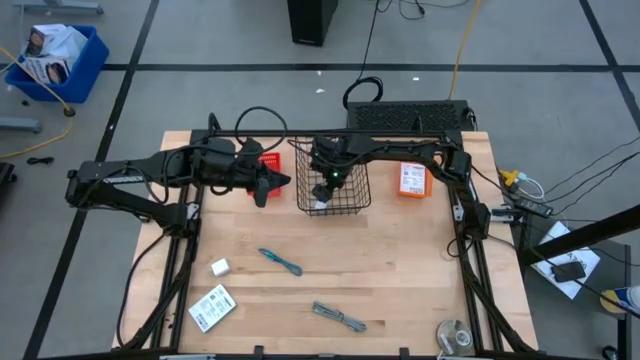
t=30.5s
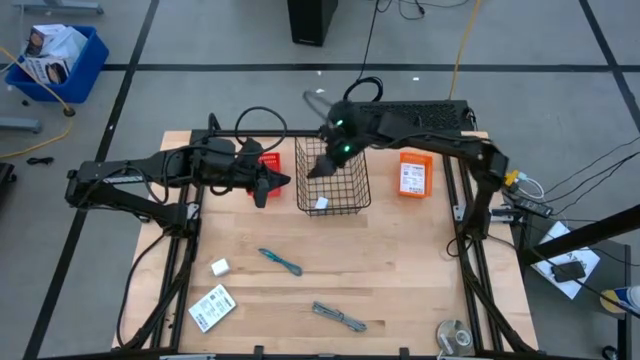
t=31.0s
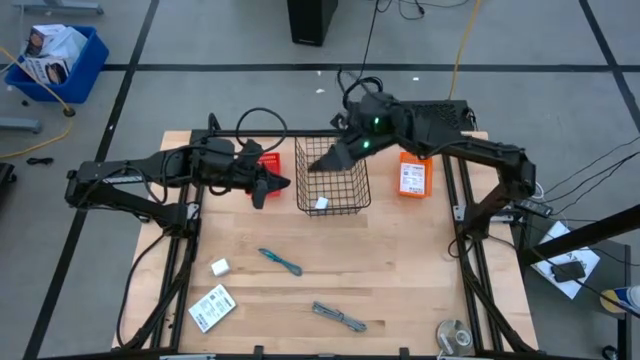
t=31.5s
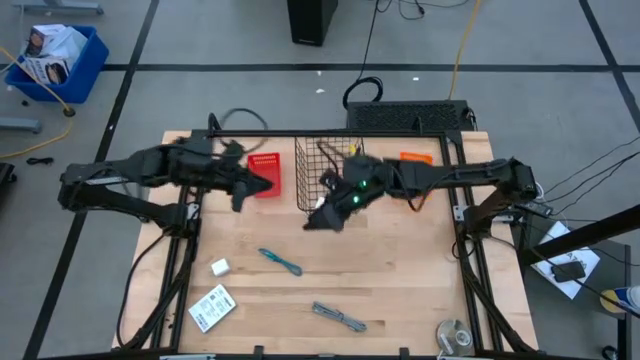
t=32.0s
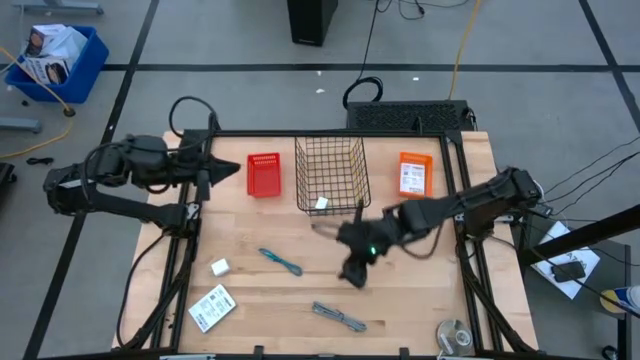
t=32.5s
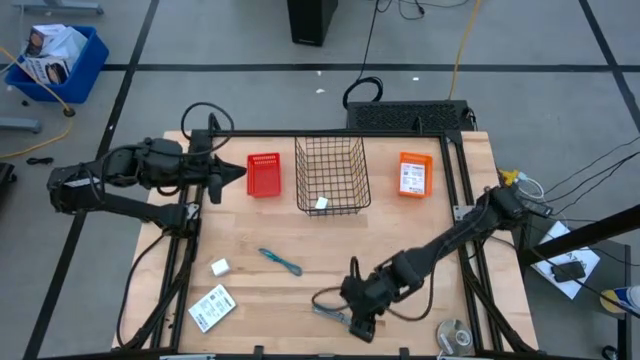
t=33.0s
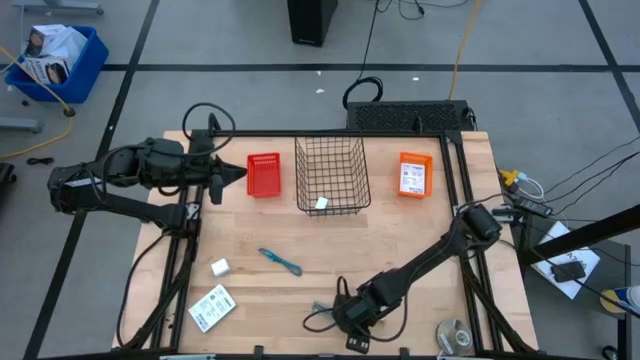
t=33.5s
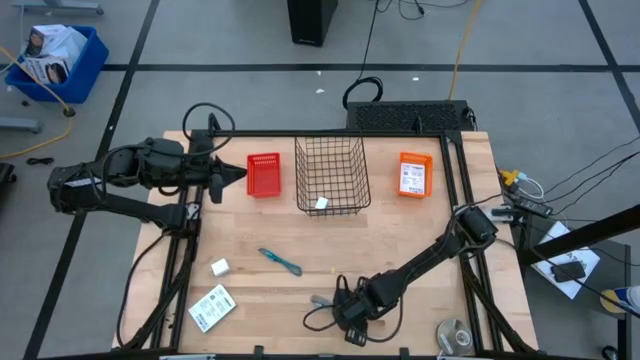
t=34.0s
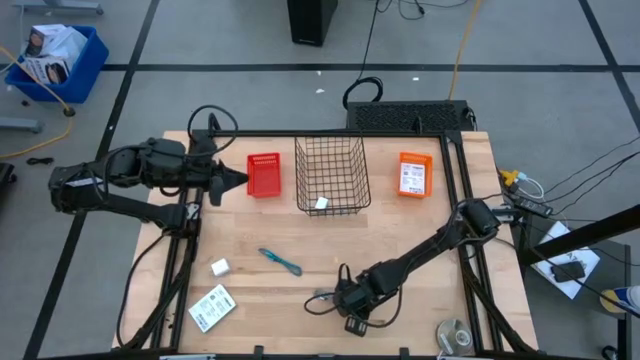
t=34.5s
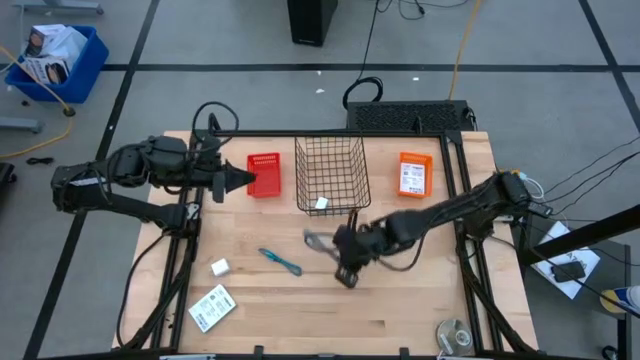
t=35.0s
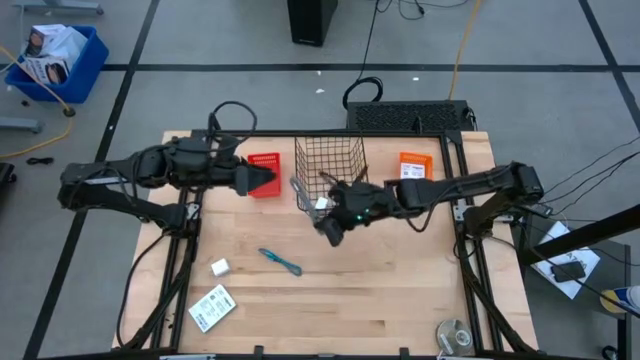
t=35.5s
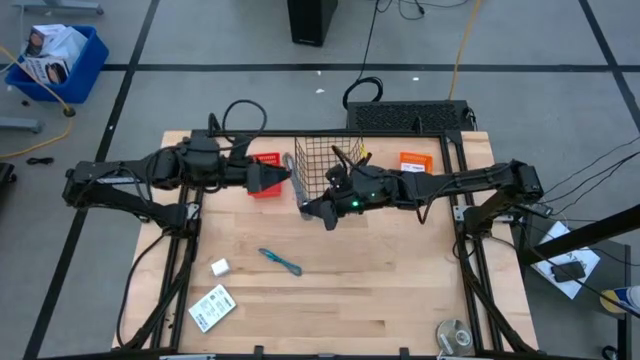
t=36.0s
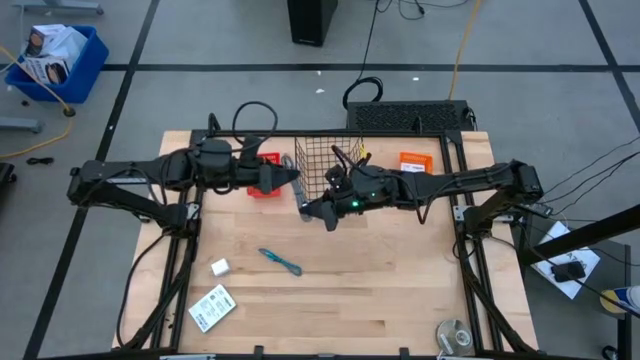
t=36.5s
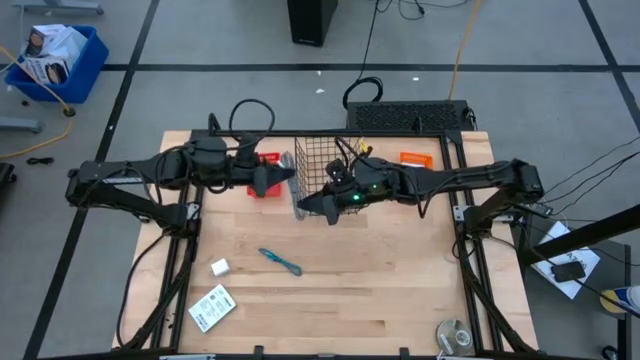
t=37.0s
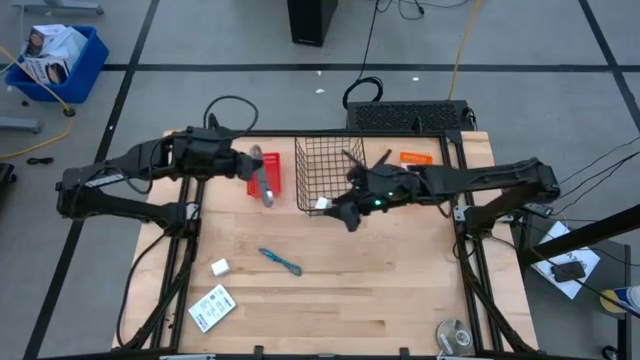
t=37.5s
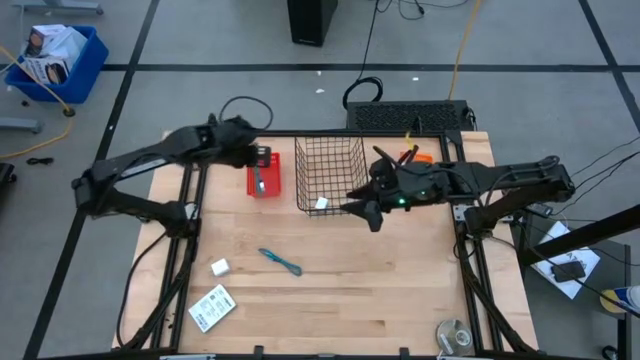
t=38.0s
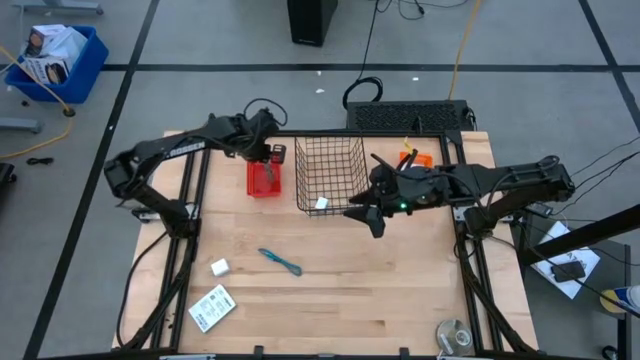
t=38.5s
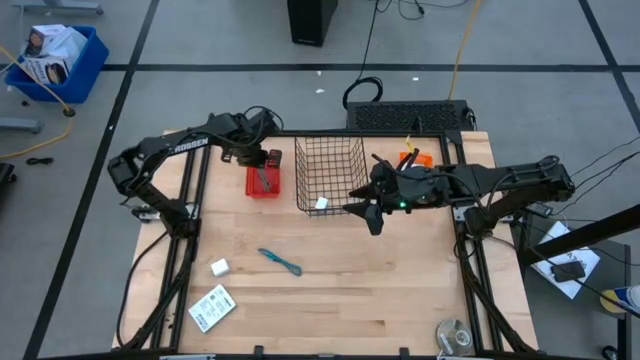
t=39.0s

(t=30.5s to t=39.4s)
Task: Pick and place items into bin
Put the black charger cable into the red bin

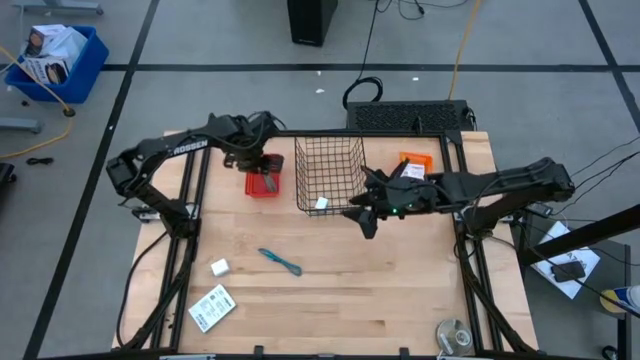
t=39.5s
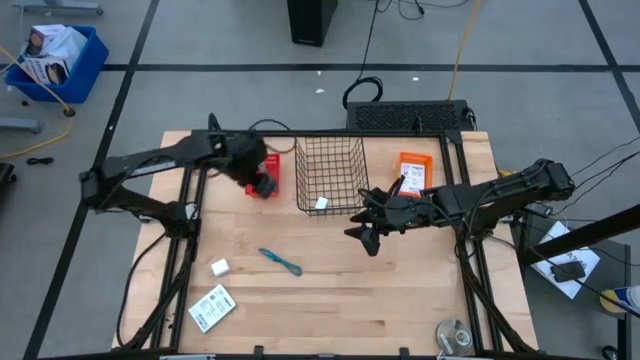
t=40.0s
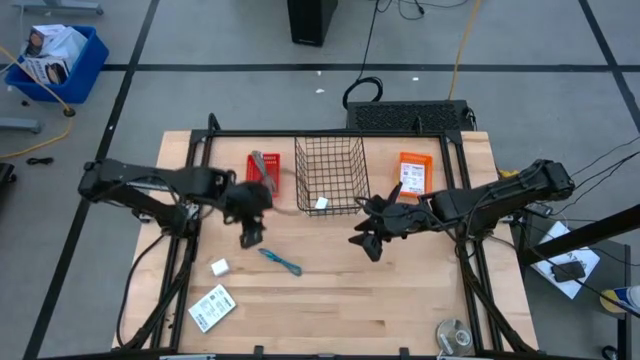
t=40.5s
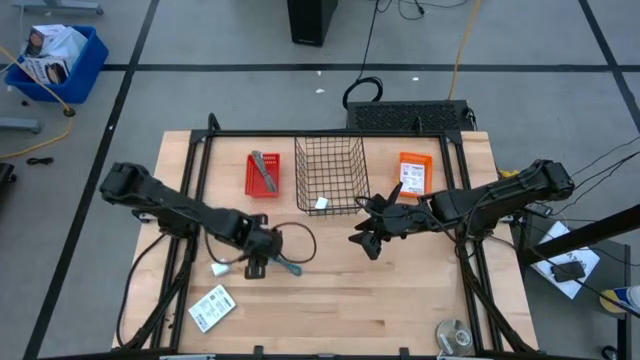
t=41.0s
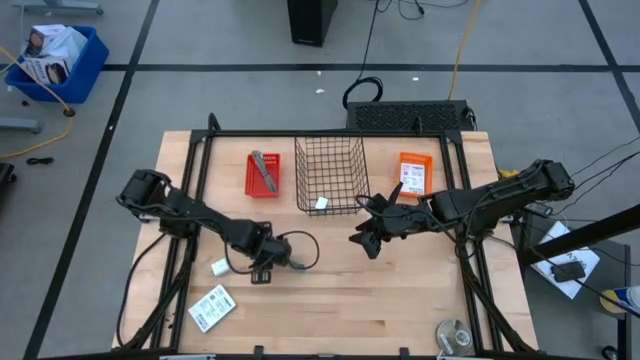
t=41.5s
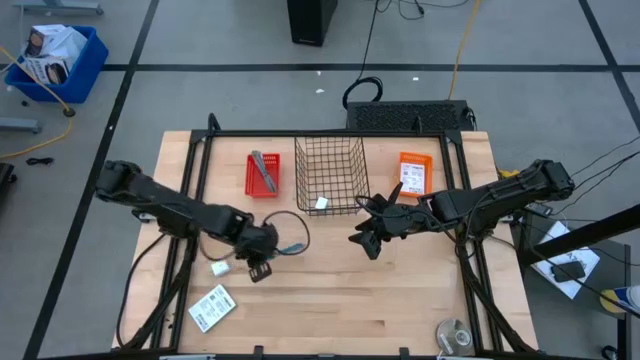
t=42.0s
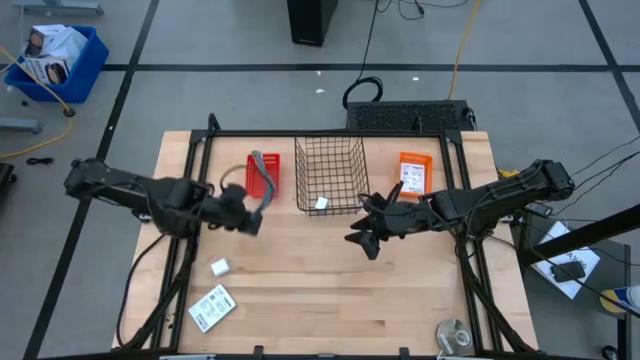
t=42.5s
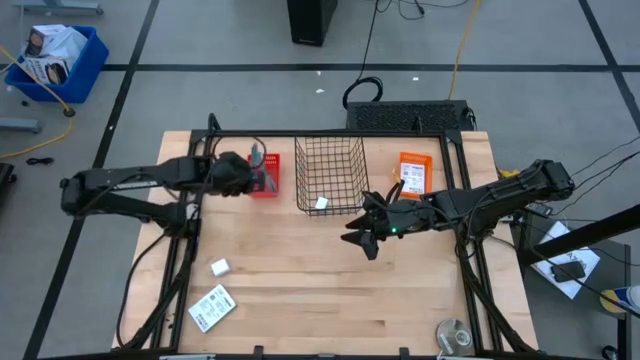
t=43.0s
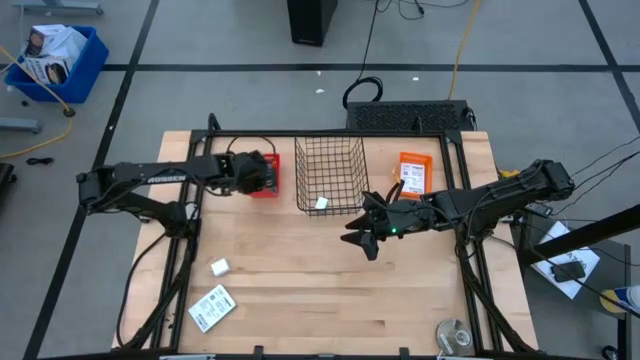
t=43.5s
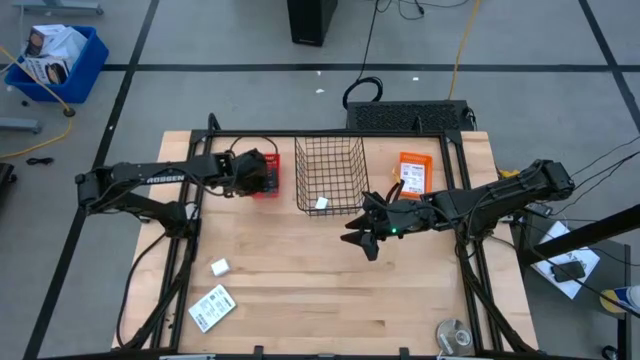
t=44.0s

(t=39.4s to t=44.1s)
Put the blue charger cable into the red bin

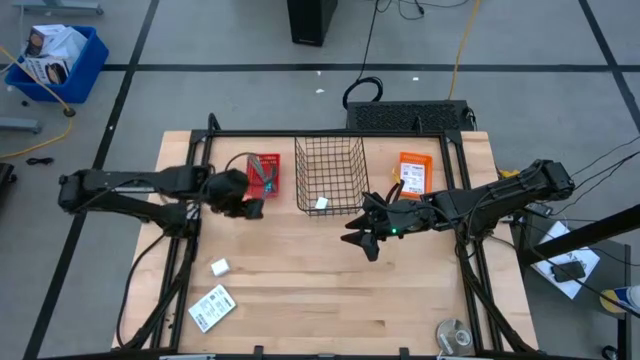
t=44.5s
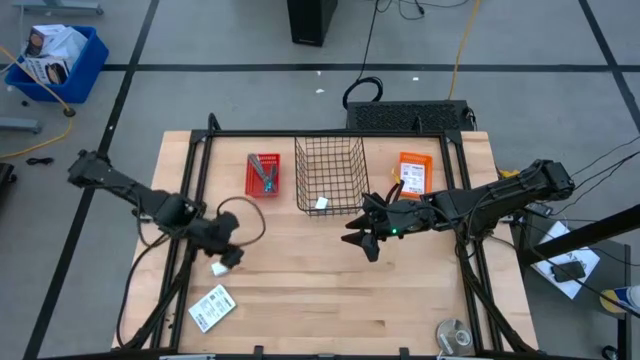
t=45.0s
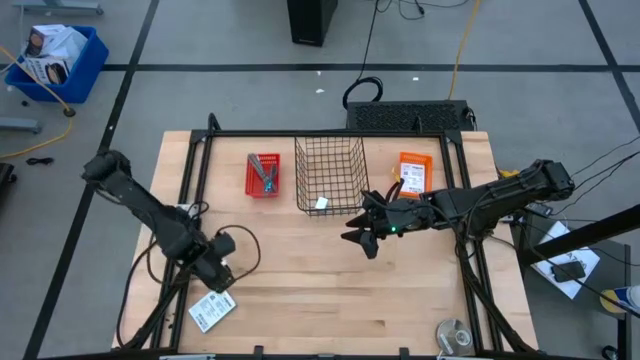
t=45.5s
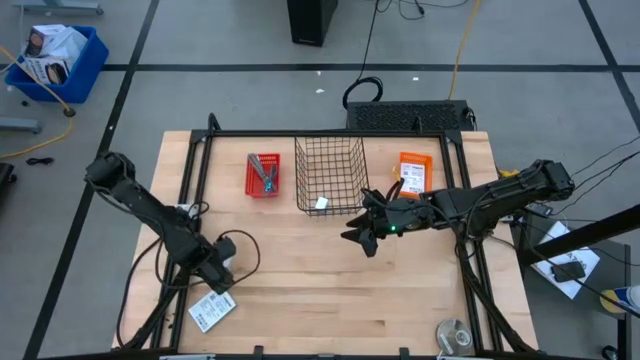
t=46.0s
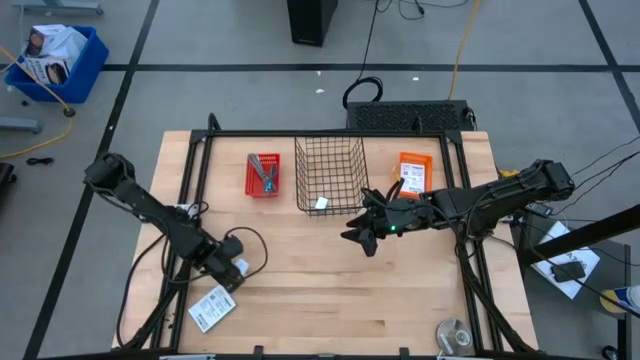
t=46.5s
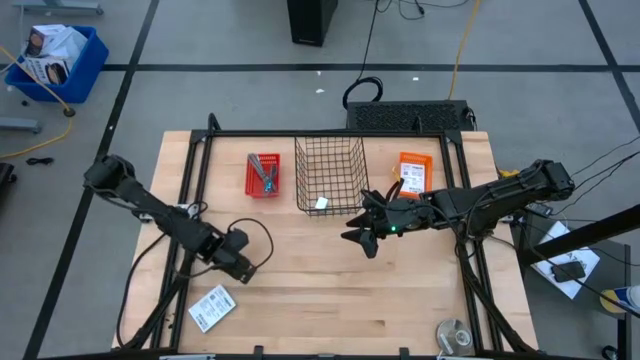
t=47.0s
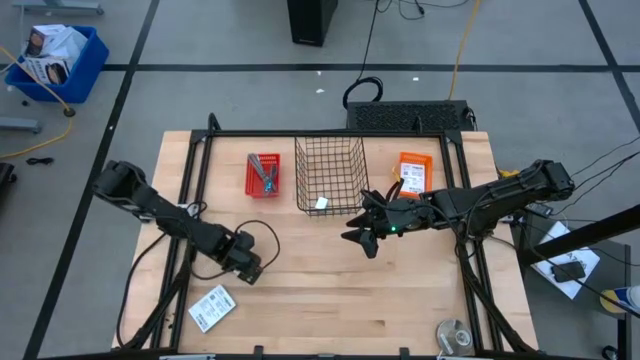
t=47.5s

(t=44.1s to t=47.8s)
Put the white charger adaptor into the wire basket

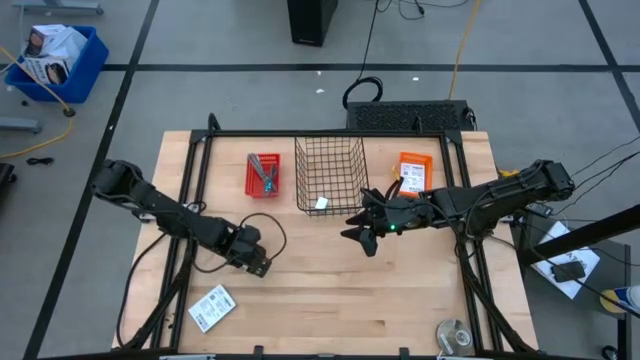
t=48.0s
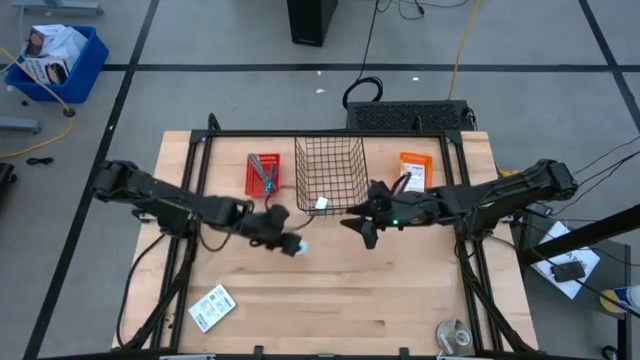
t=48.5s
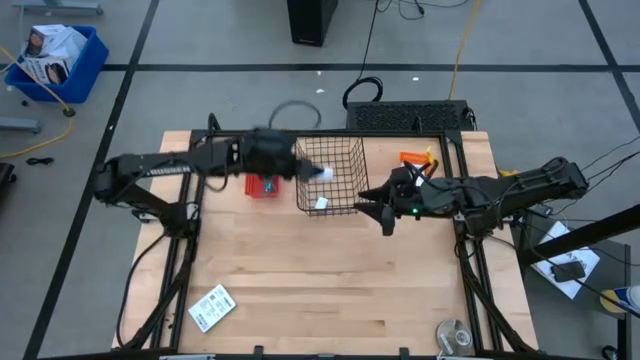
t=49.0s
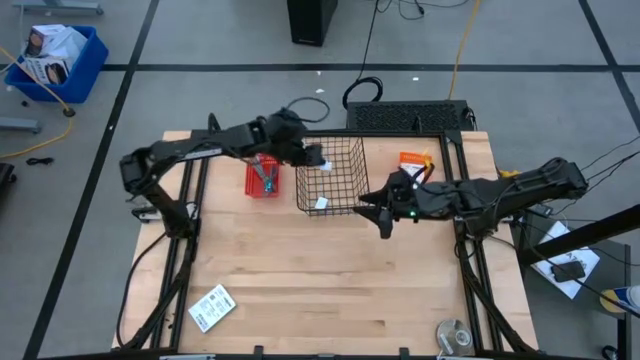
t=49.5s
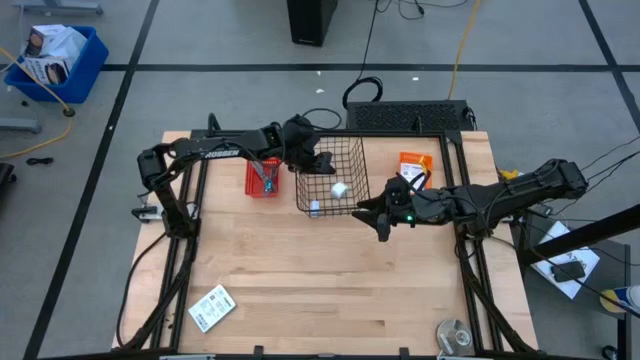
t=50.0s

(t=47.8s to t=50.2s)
Put the white charger adaptor into the wire basket

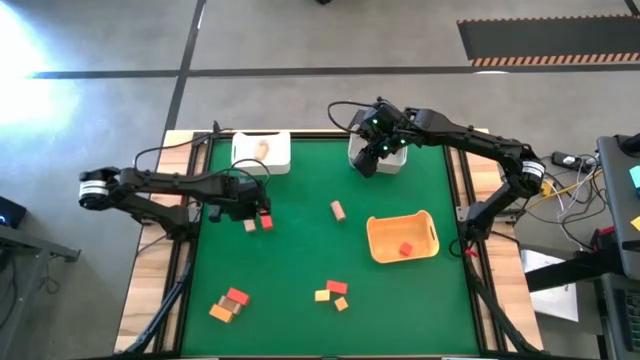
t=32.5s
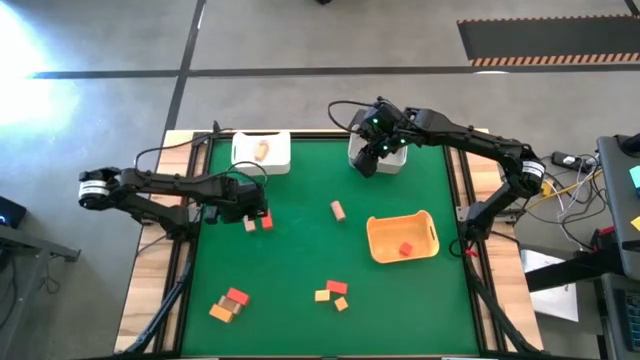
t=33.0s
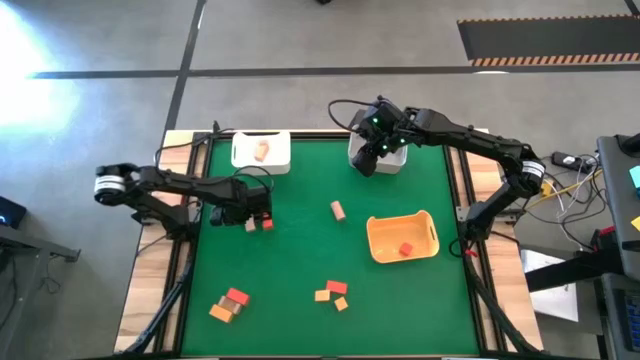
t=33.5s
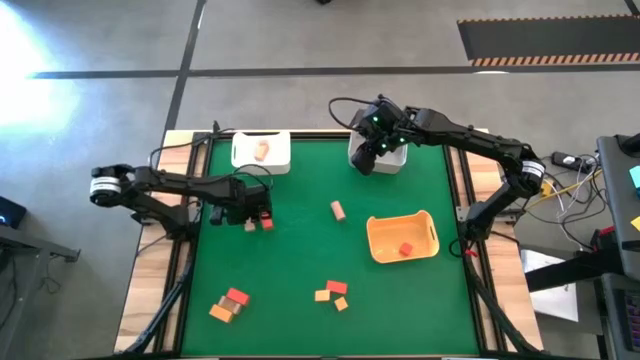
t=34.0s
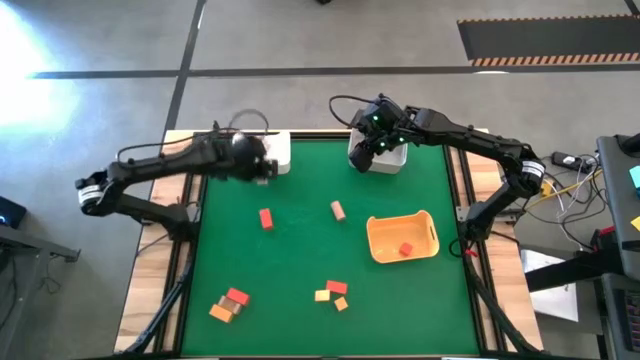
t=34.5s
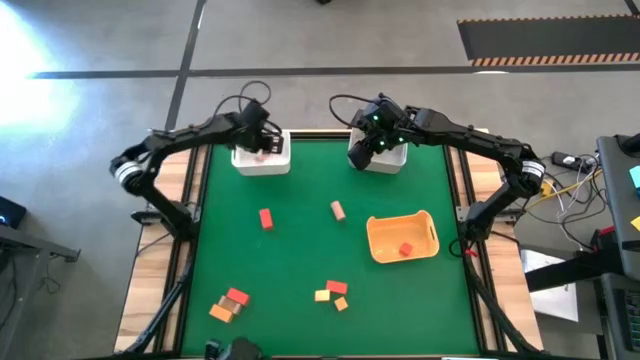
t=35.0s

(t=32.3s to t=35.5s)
Task: Sort & place blocks by color
Put the brown block into the white bin
